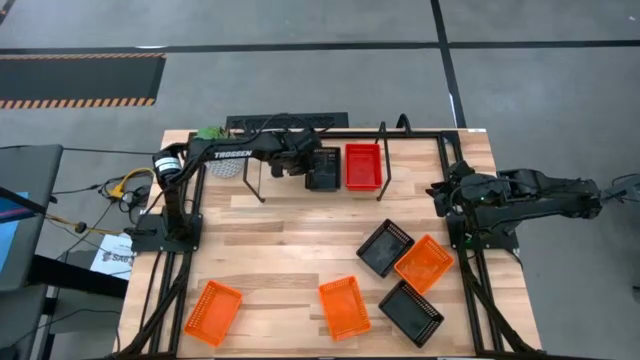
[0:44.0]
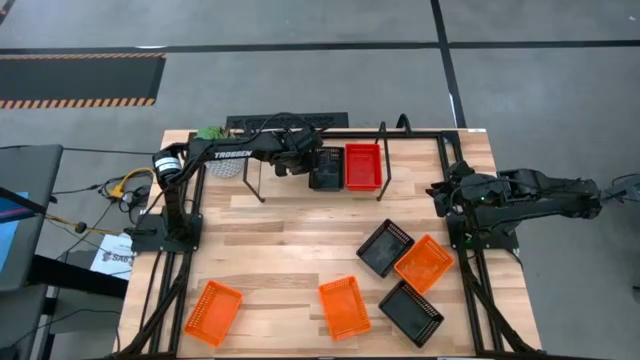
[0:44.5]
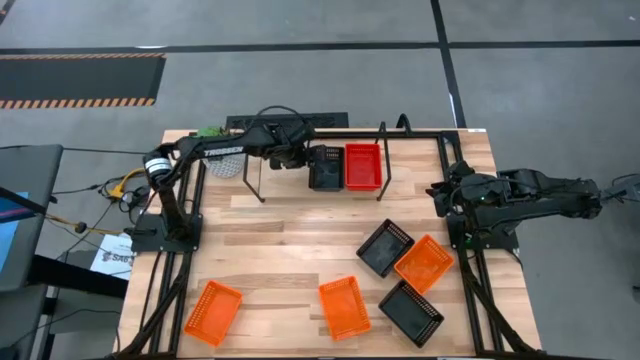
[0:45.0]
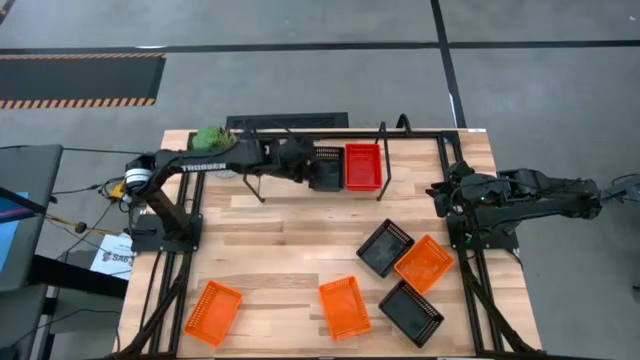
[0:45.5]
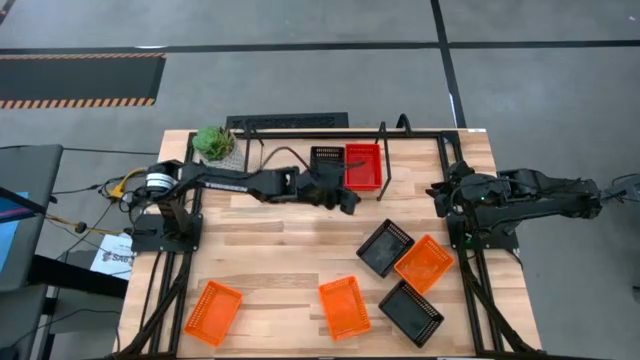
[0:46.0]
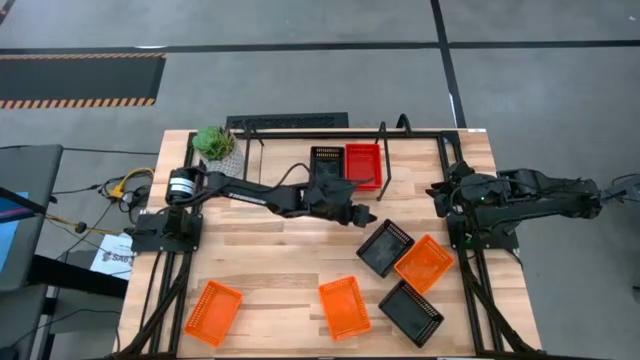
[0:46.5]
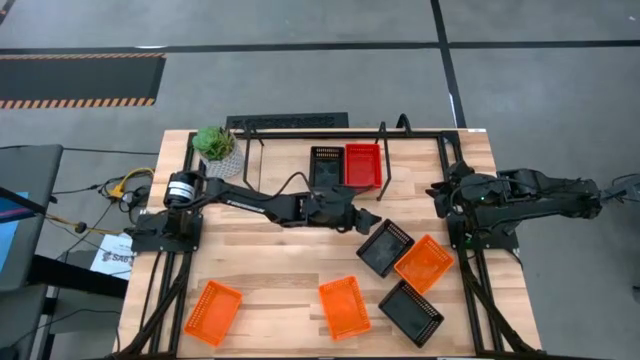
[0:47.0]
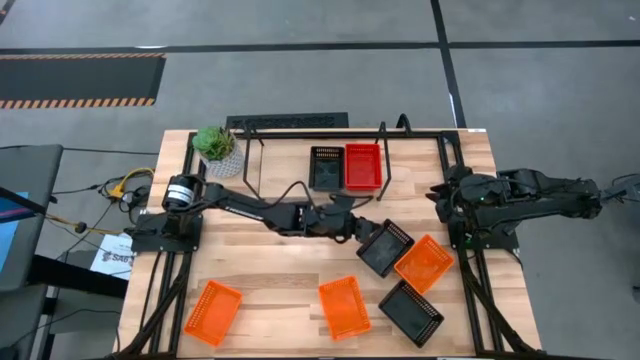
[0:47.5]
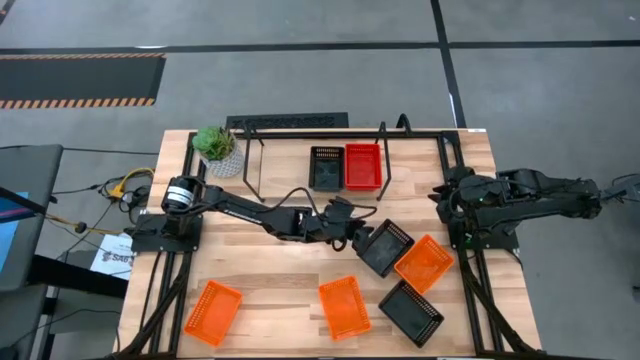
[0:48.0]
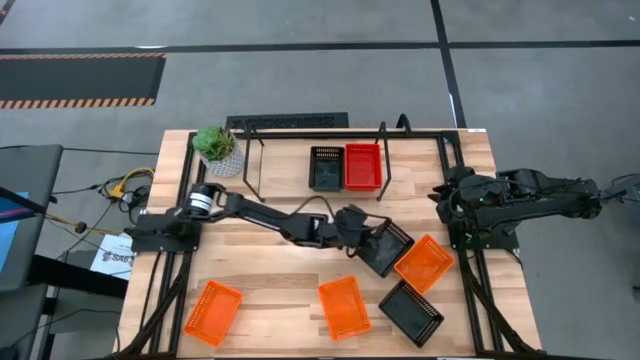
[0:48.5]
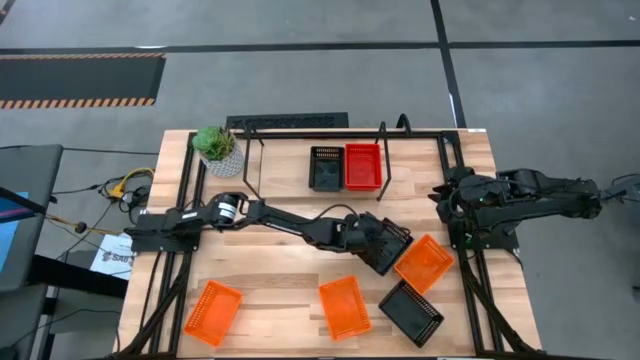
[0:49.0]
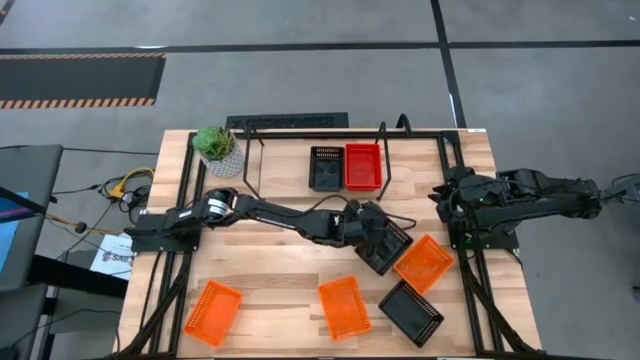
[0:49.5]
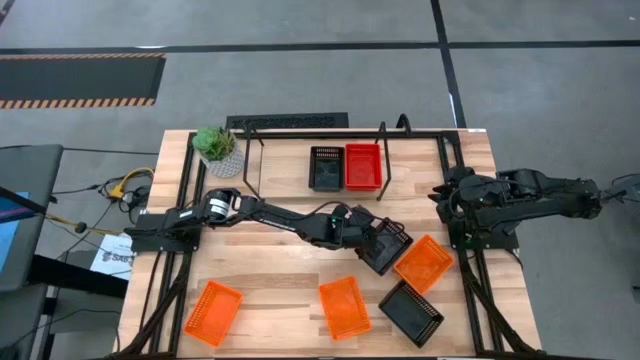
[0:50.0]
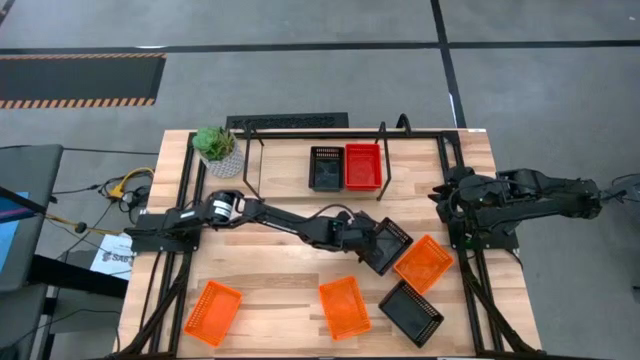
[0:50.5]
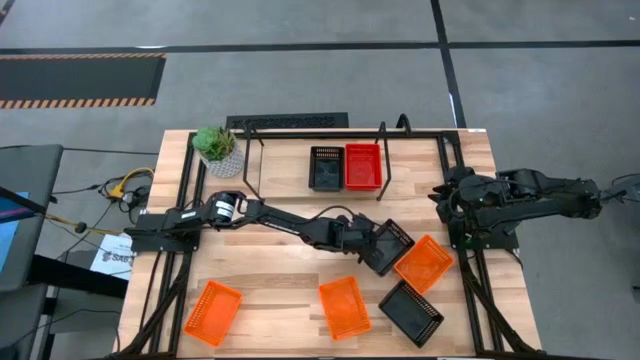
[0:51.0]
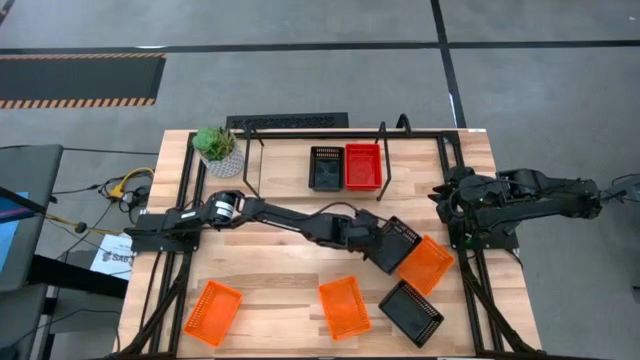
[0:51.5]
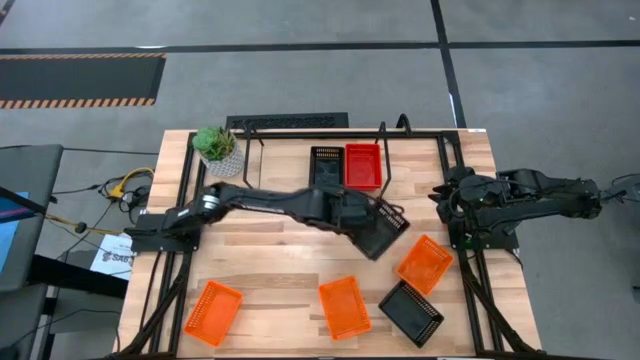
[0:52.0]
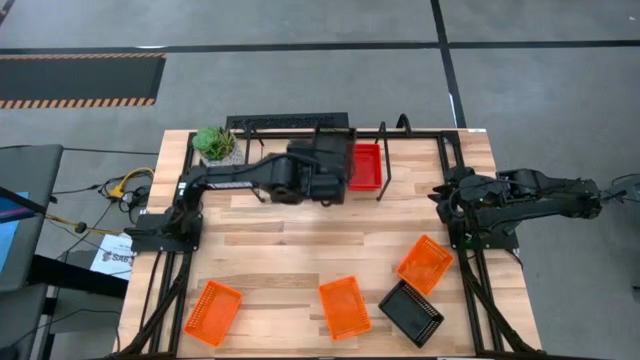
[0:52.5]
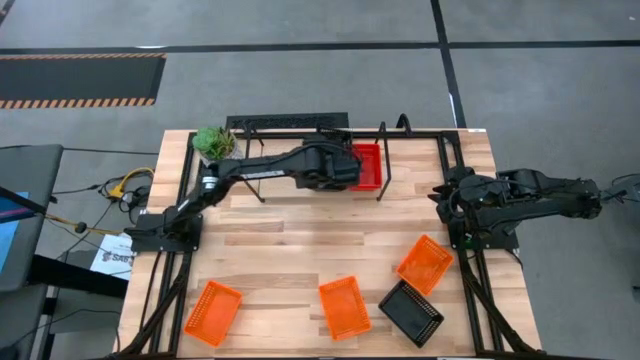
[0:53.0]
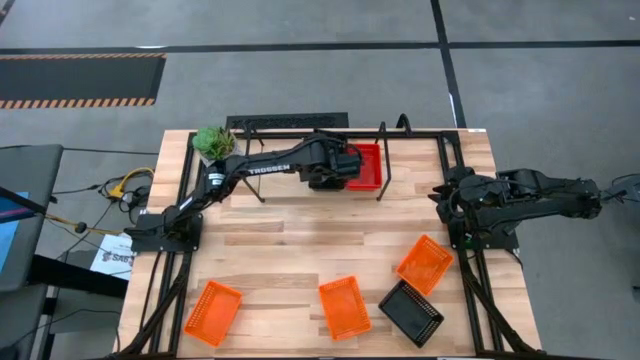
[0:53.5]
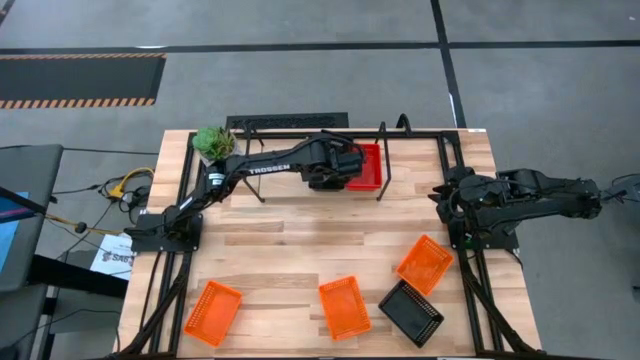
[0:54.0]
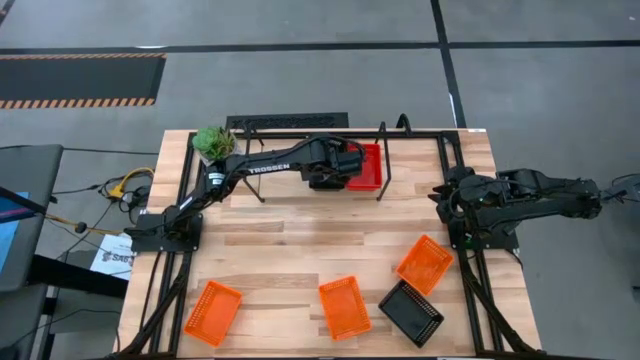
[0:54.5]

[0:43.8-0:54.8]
Task: Stack baskets on shelf by color
Stack the top black bin on top of the black bin on the shelf

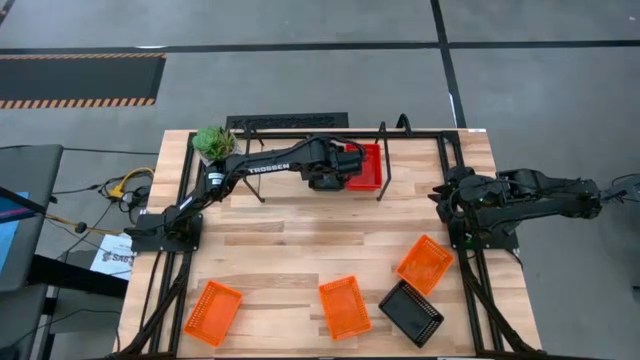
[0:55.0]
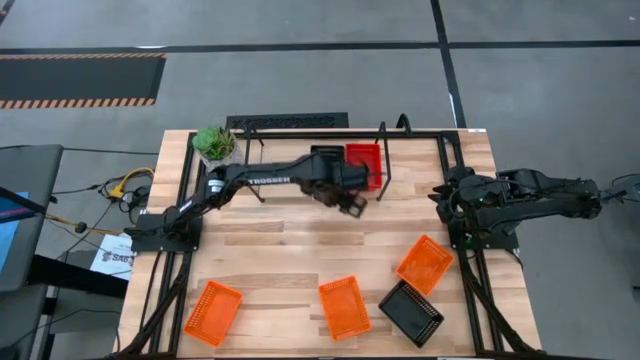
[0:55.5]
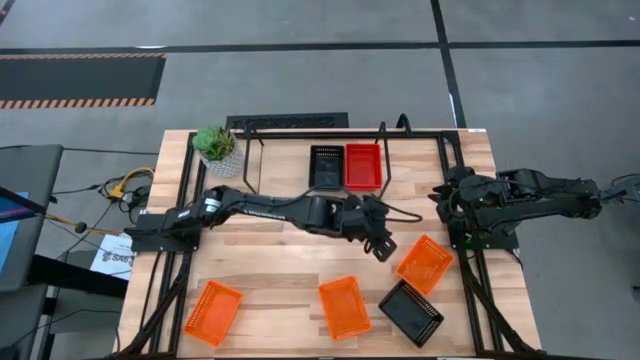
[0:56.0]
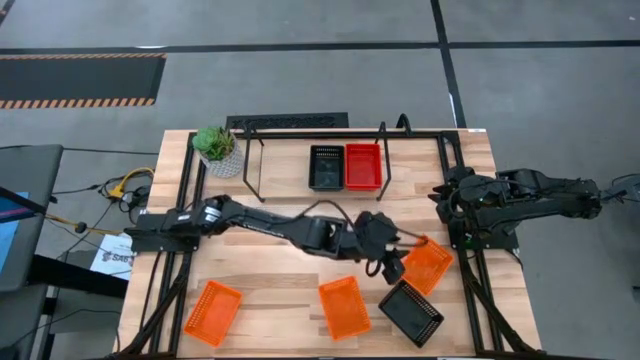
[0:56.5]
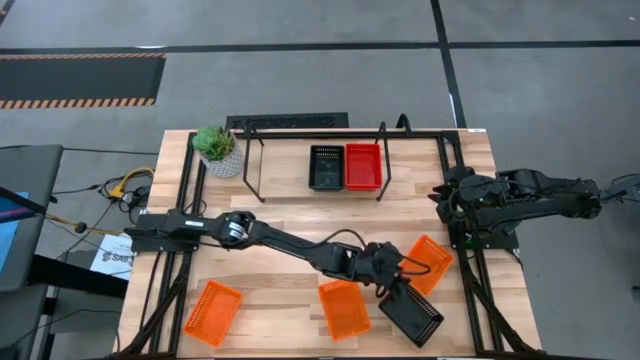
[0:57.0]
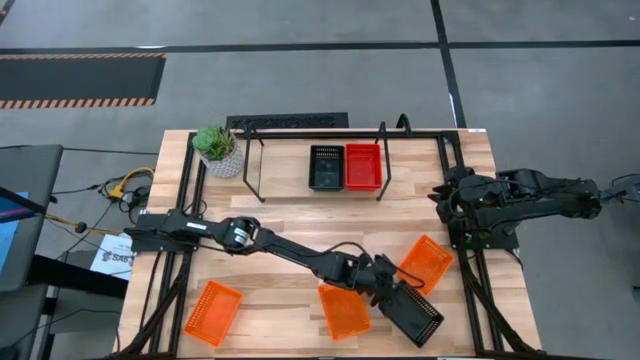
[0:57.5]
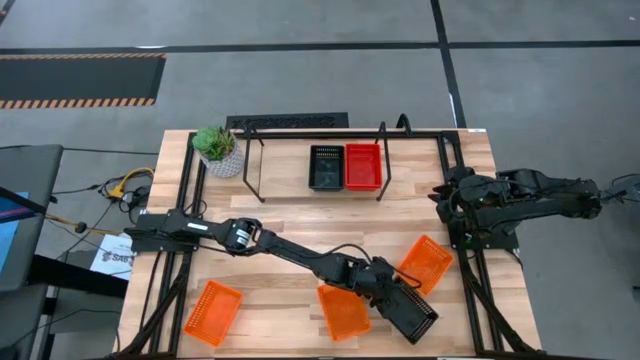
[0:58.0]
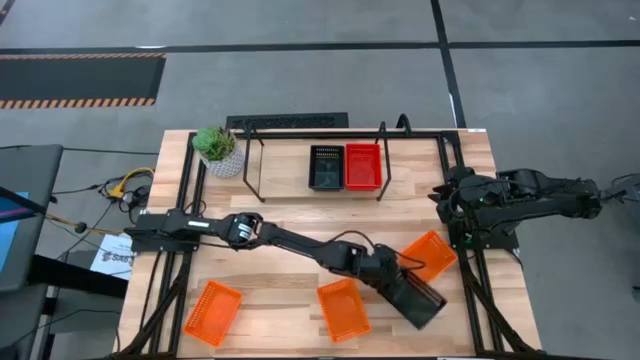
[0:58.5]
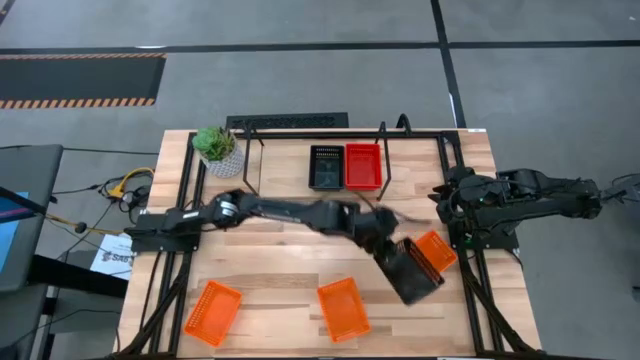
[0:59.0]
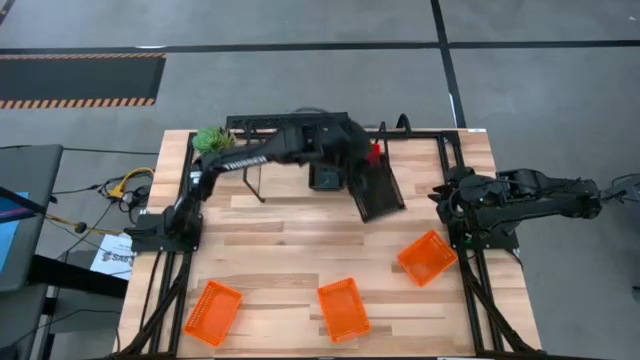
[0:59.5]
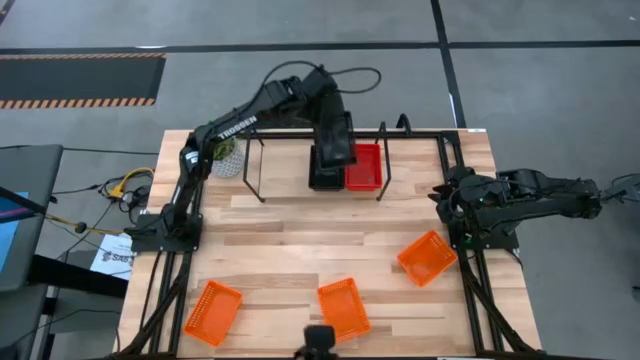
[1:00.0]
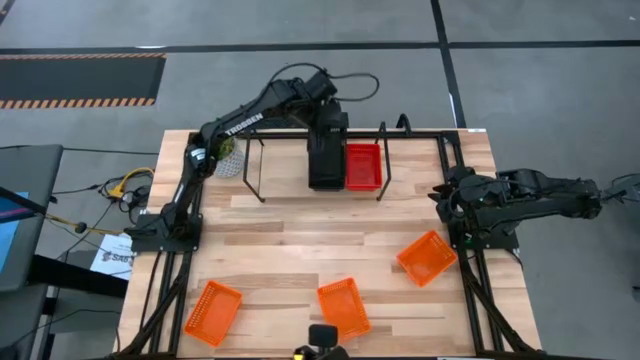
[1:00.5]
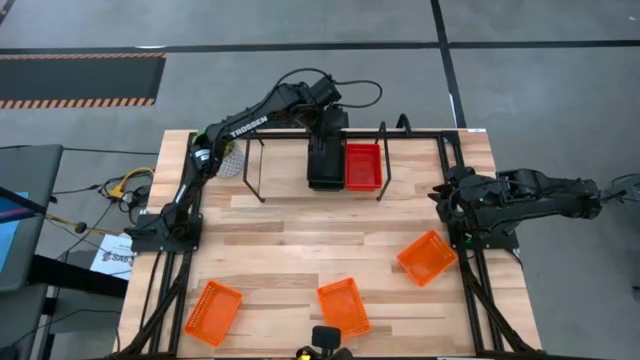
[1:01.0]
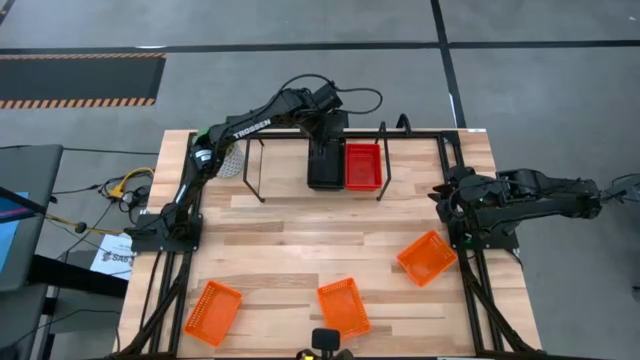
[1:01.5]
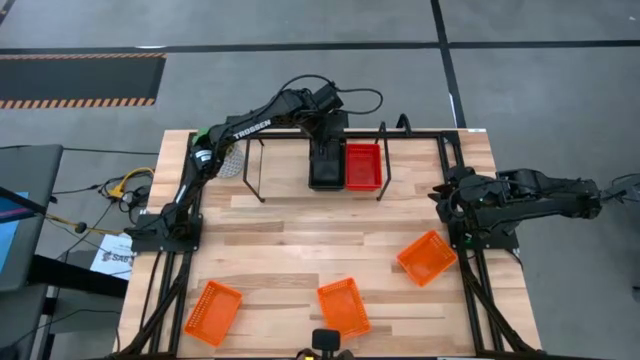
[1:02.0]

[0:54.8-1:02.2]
Stack the black bin on top of the black bins on the shelf

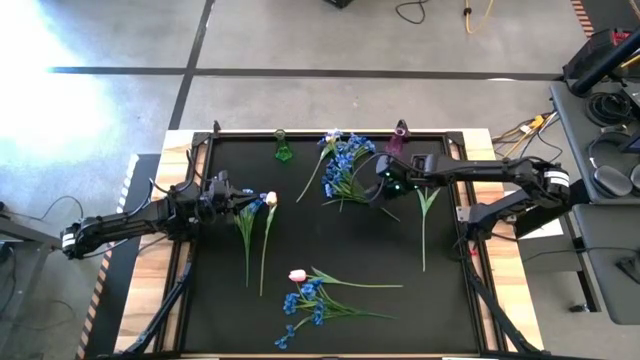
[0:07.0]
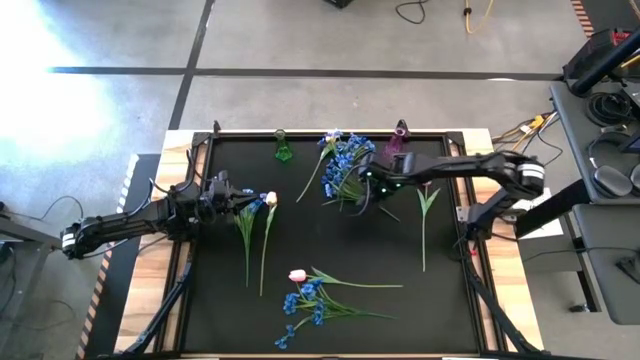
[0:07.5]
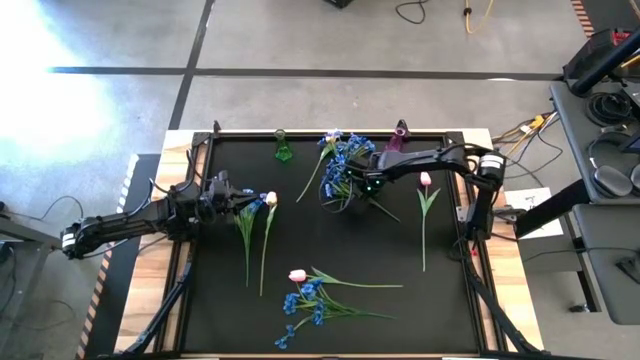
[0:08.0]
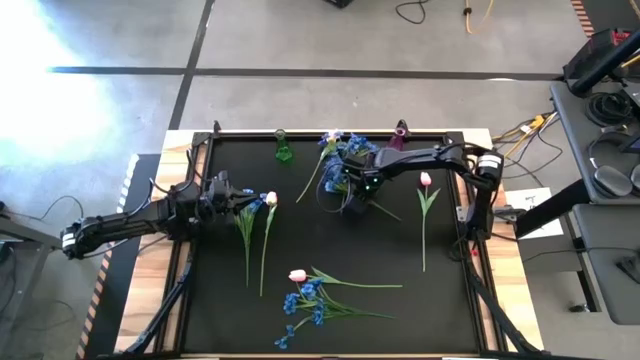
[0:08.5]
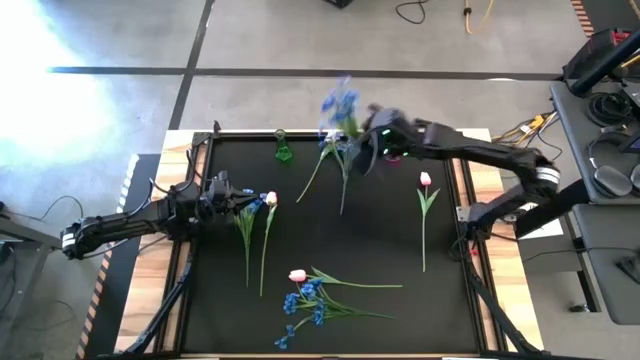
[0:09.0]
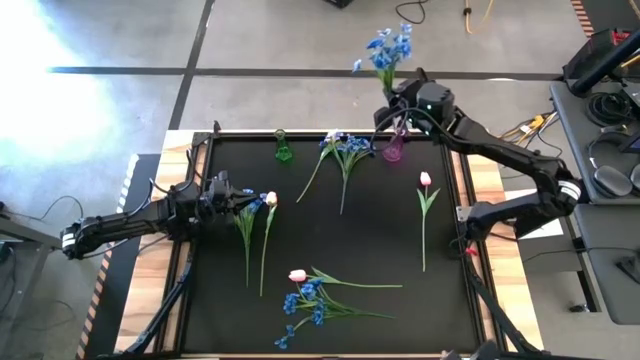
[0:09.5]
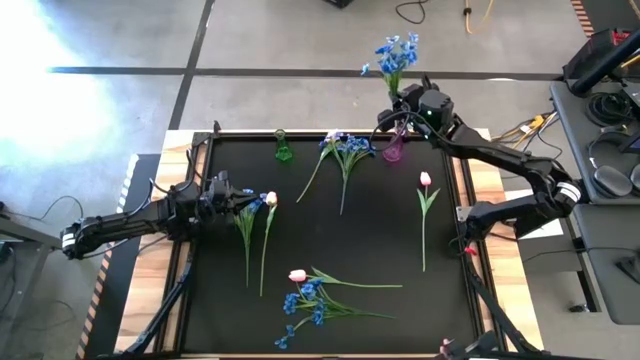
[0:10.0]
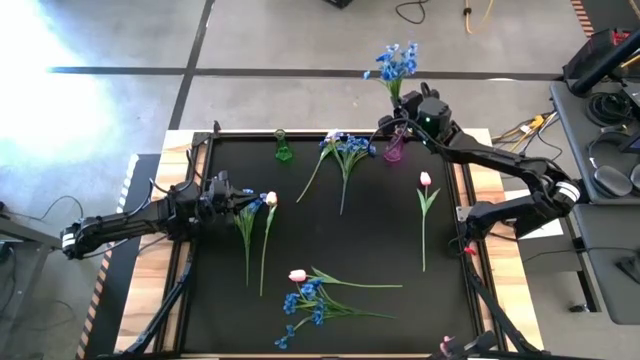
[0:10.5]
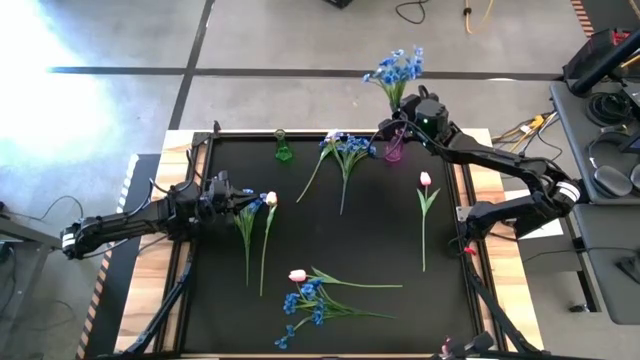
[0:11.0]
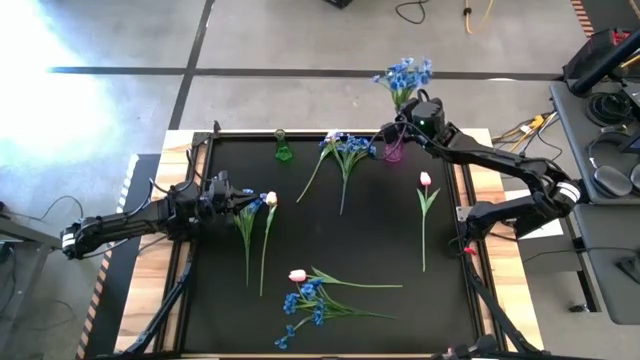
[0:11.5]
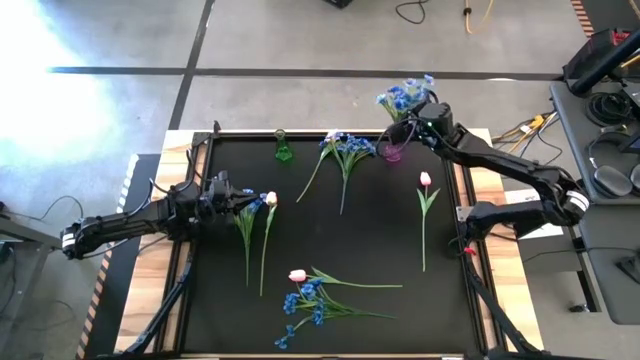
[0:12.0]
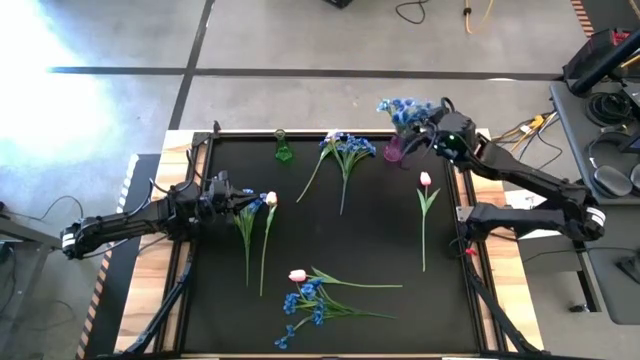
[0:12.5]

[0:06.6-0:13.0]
Task: Sort flowers into vase by color
Put the blue flowers into the violet vase
